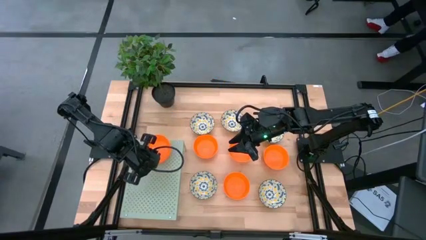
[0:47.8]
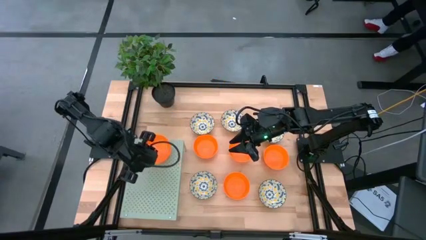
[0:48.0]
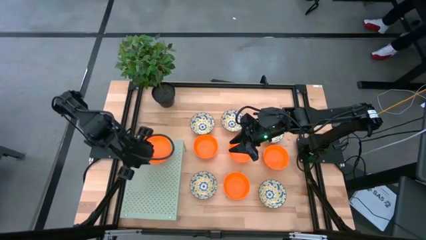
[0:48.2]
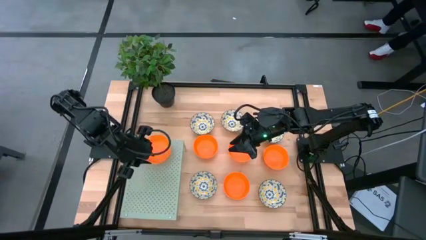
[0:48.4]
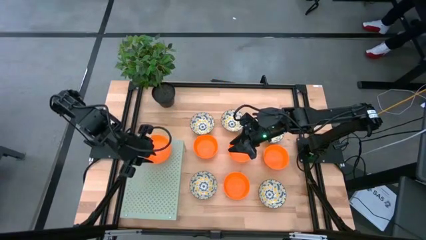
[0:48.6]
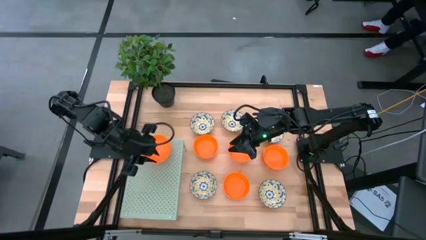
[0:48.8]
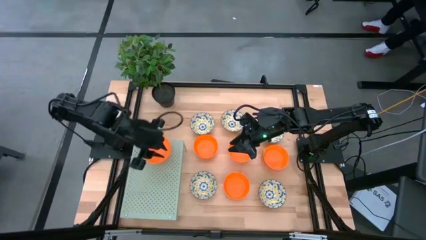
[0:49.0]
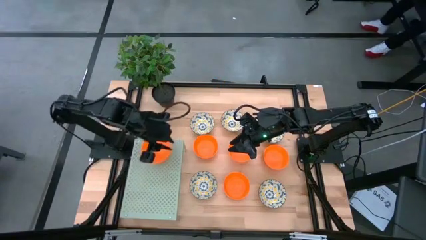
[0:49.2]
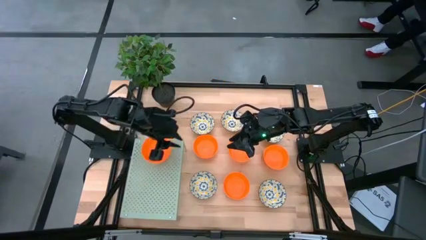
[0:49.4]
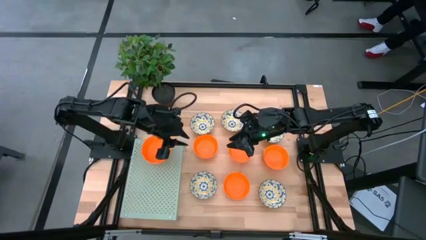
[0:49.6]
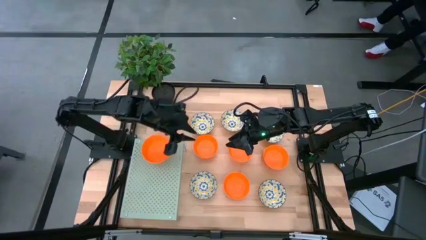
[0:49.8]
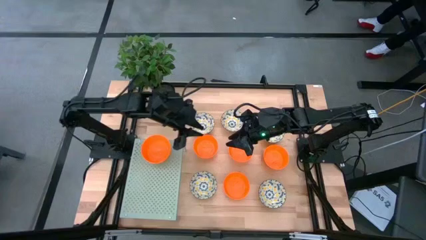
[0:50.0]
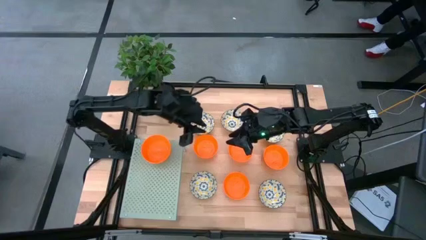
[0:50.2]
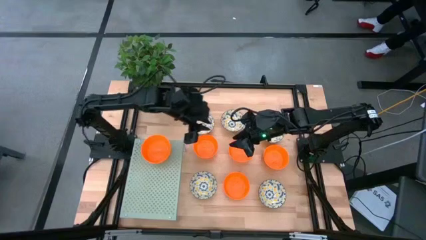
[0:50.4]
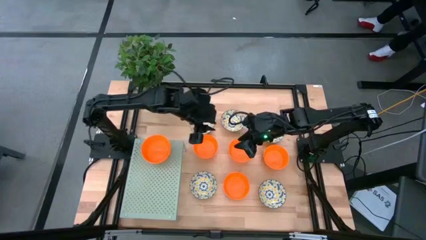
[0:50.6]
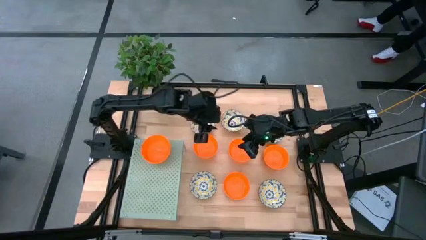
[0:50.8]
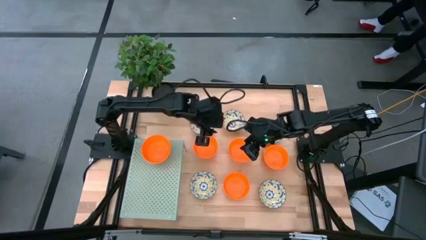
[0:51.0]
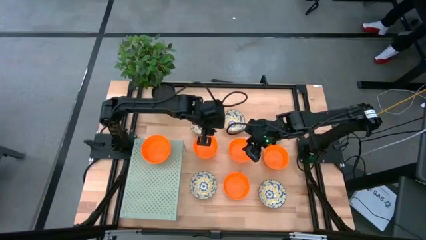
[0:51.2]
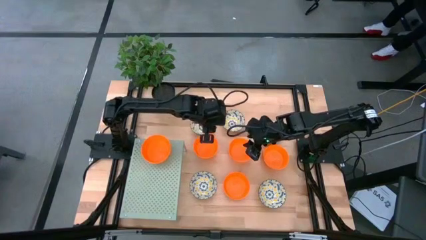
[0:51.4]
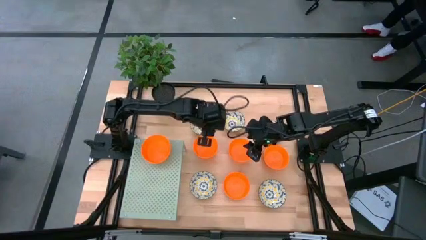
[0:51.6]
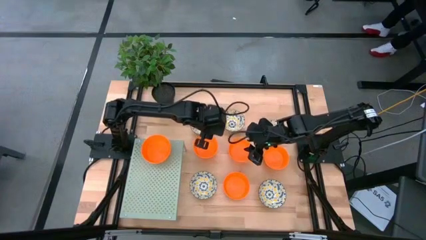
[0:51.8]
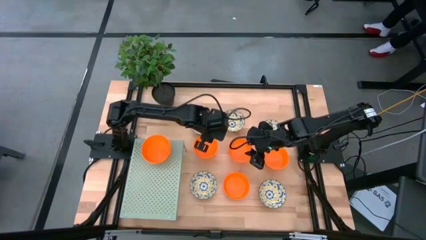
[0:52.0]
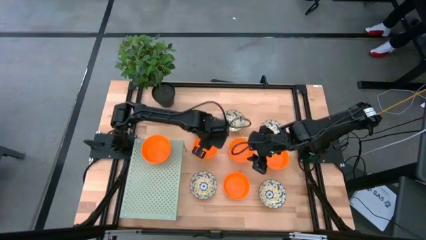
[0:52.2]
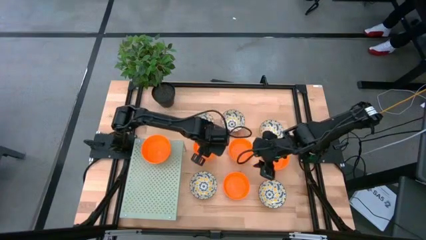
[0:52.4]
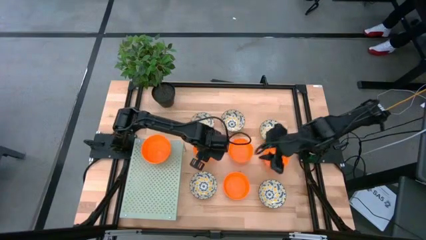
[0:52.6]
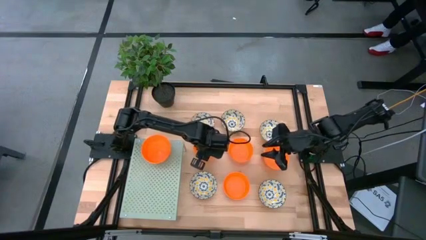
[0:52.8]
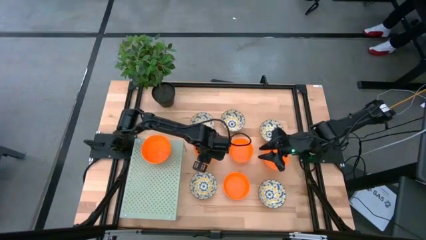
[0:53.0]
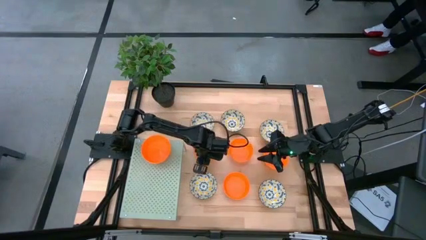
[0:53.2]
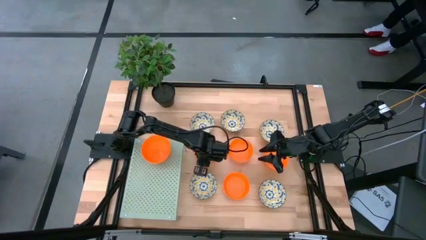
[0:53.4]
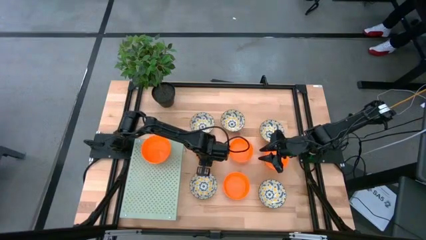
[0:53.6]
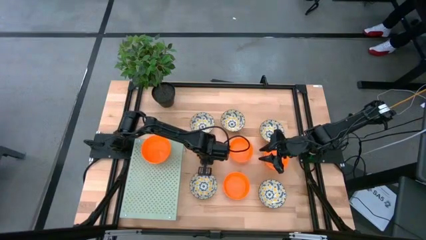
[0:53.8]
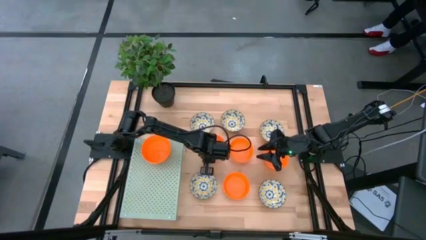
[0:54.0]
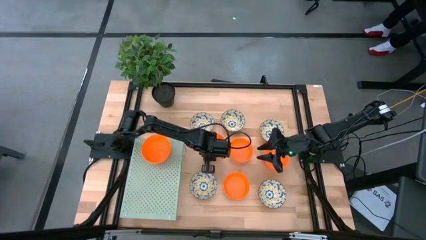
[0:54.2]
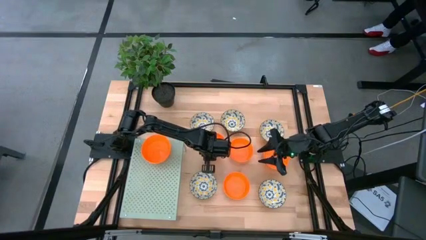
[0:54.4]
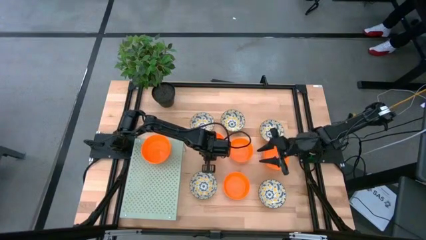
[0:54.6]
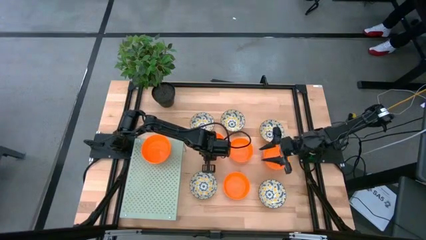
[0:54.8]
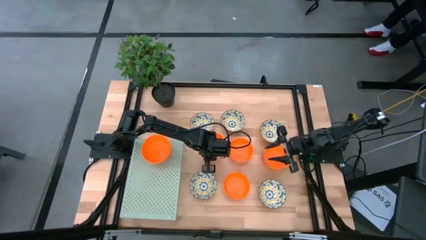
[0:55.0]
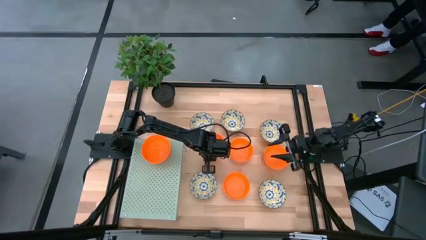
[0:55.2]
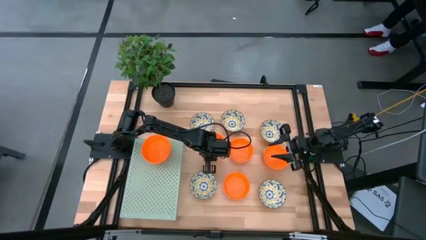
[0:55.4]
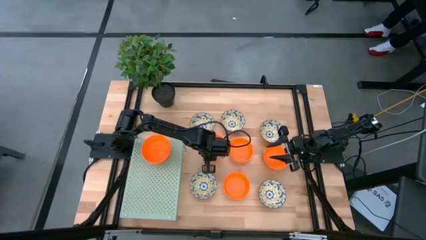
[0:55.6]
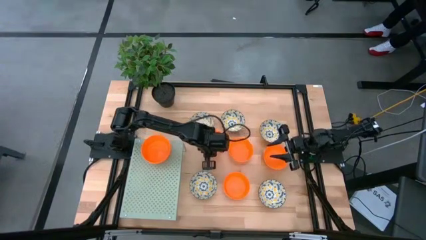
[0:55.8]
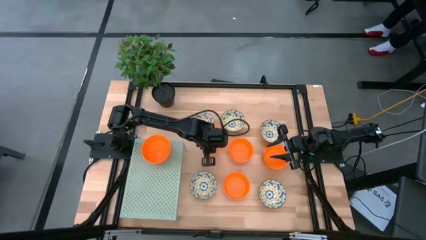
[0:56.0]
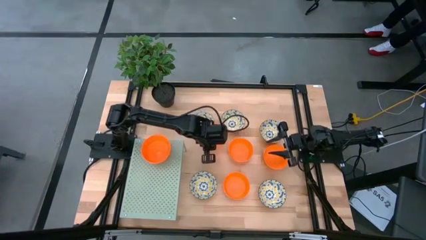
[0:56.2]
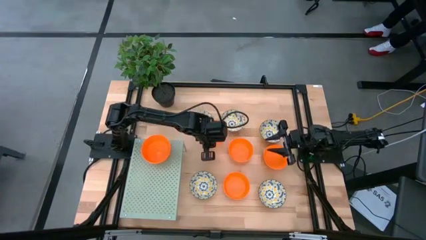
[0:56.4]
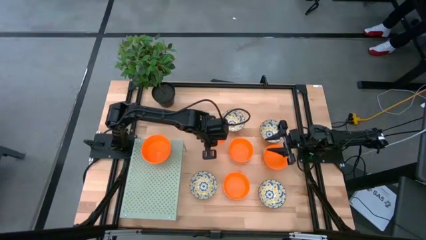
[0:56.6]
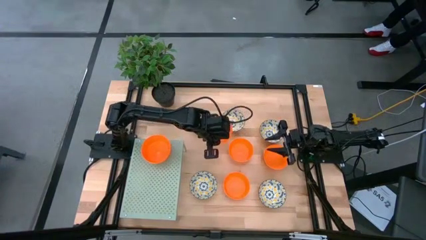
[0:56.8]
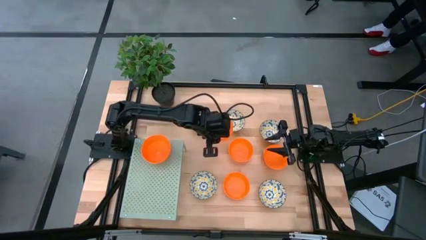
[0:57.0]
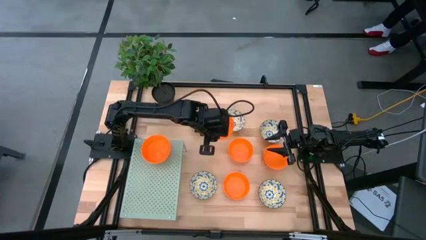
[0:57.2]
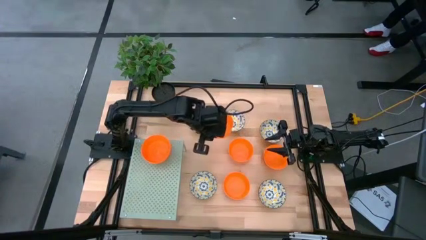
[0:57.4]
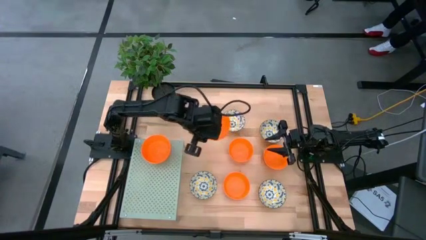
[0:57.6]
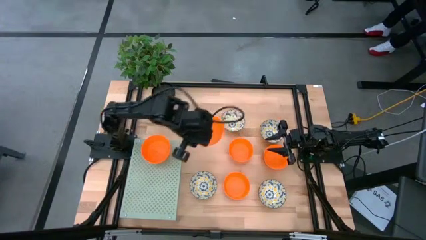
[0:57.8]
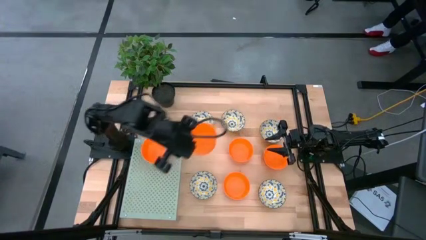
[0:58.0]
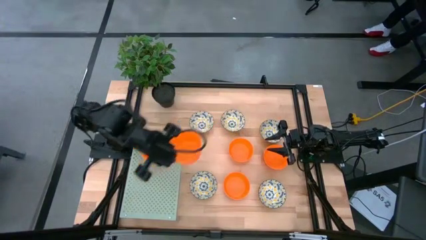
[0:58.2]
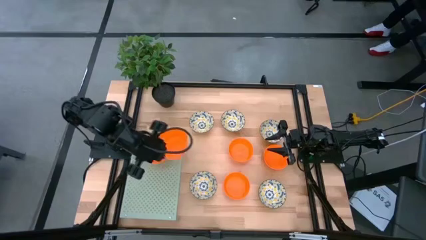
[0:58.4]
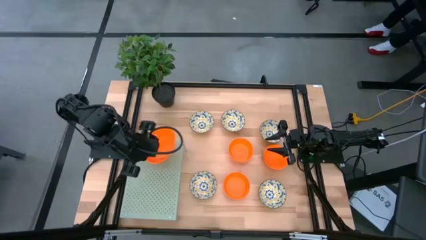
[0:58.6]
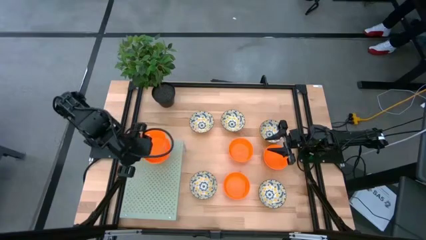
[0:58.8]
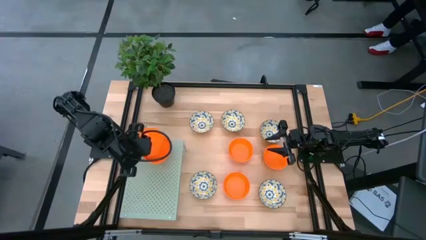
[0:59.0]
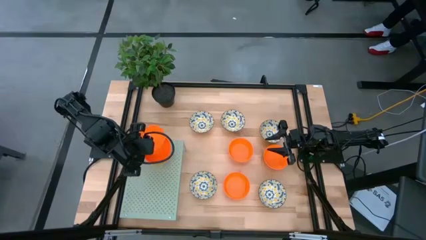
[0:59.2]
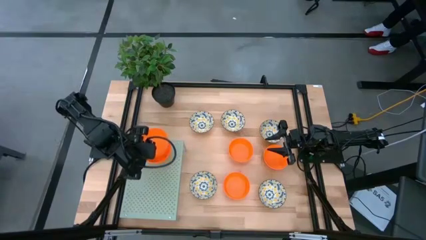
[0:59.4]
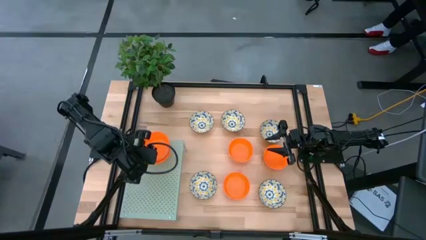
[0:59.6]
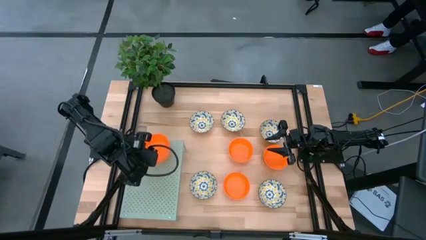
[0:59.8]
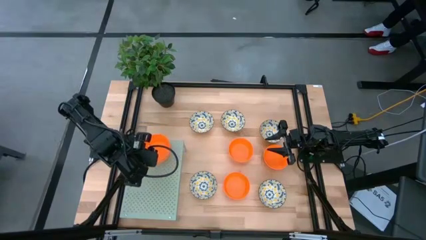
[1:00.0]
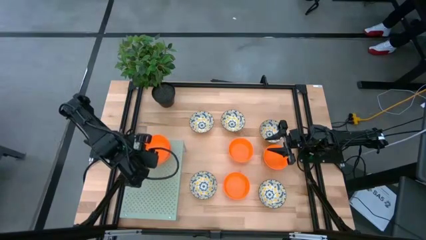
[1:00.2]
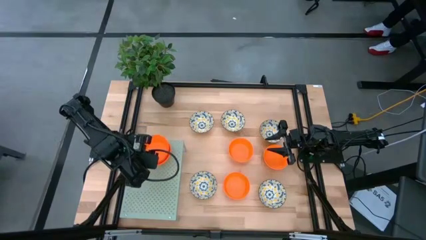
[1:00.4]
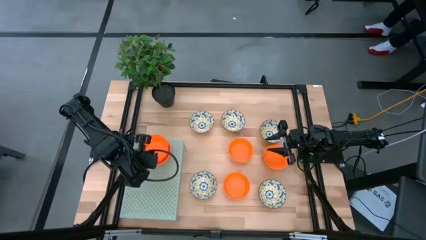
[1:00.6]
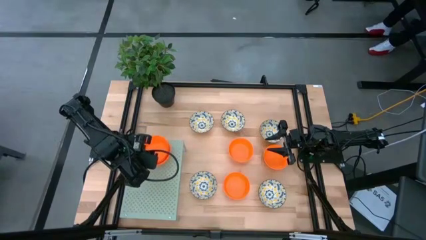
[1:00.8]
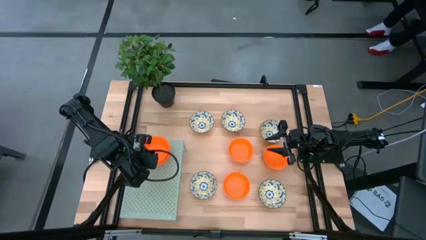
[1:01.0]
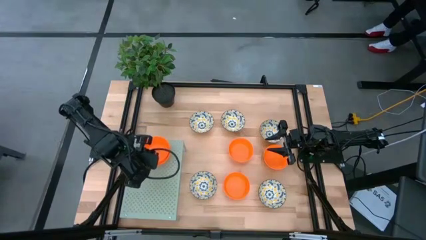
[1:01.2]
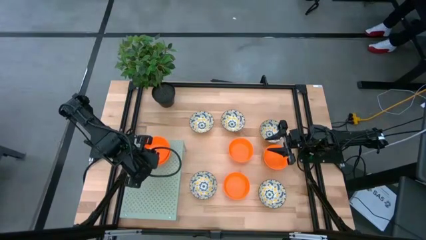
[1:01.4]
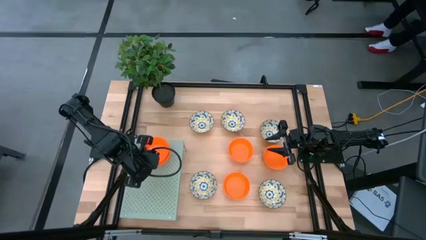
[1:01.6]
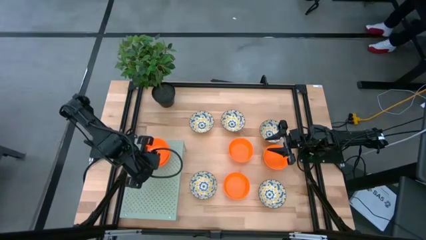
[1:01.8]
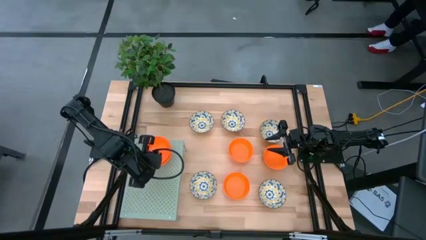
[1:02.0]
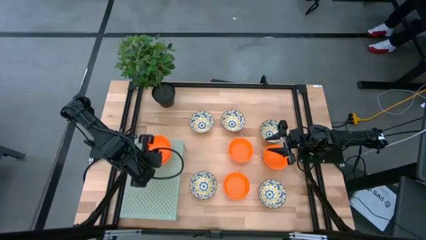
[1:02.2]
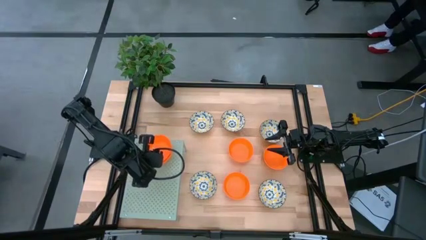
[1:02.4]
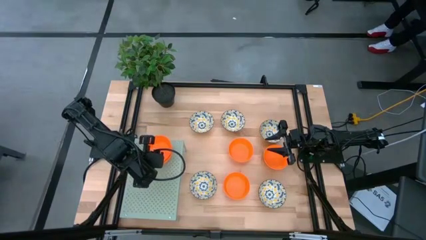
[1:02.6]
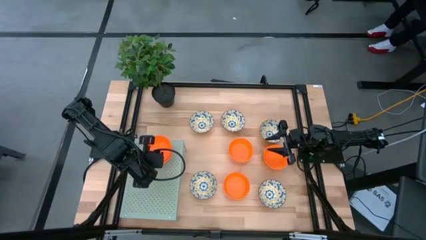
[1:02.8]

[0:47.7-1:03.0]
Task: Pick & Place Mini bowls
Stack the orange bowl on top of the orange bowl on the shelf

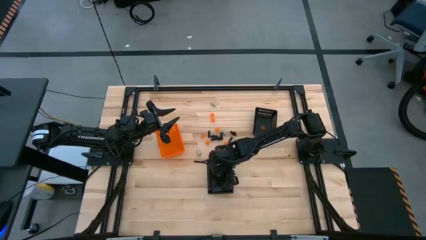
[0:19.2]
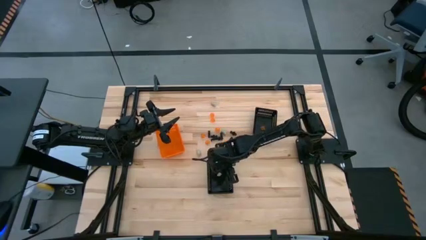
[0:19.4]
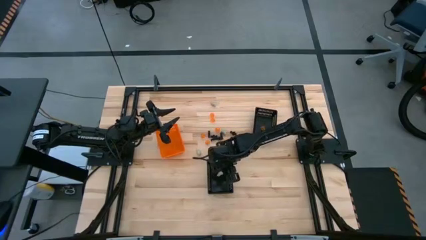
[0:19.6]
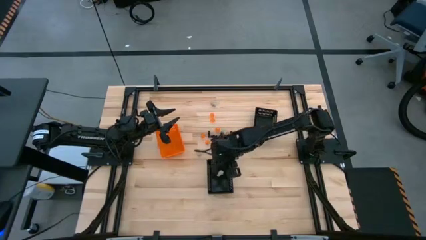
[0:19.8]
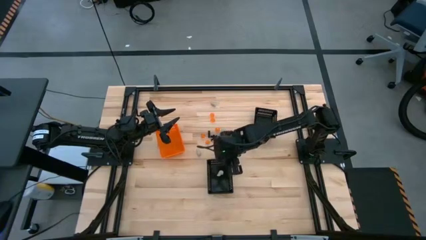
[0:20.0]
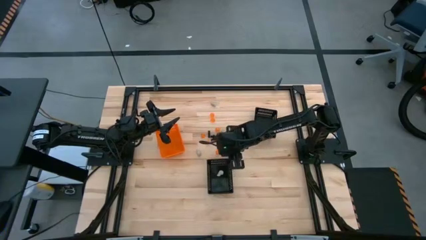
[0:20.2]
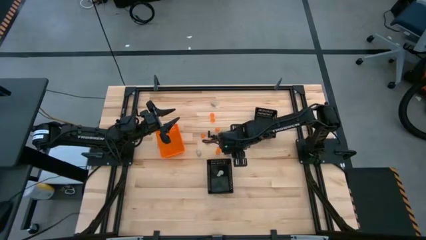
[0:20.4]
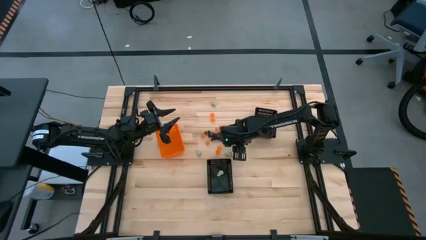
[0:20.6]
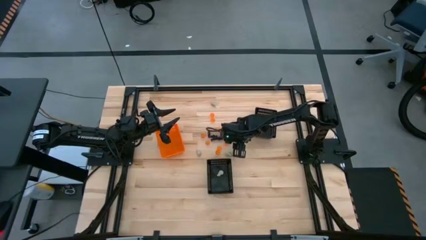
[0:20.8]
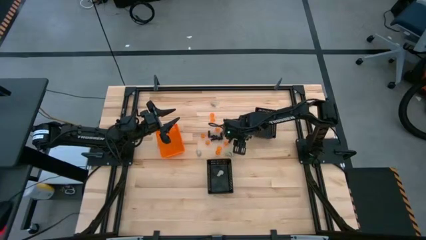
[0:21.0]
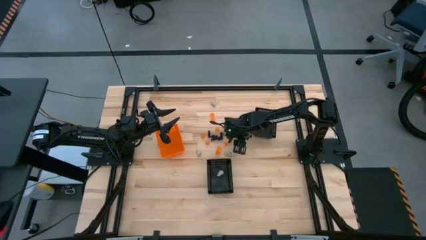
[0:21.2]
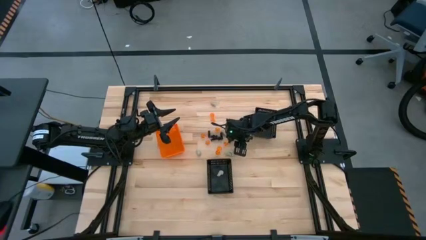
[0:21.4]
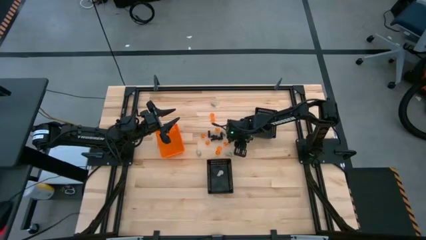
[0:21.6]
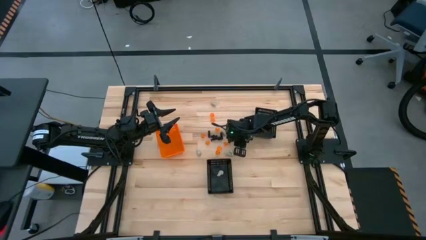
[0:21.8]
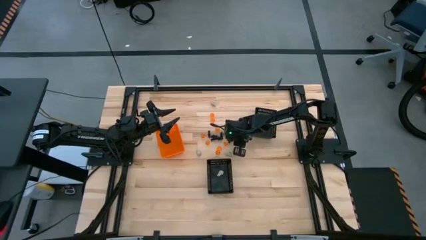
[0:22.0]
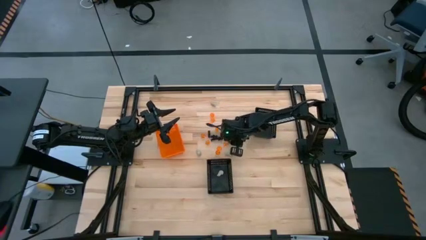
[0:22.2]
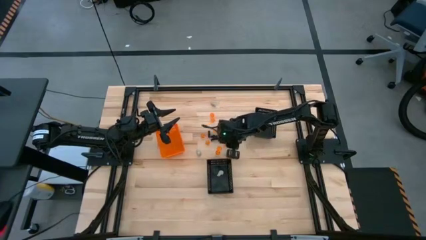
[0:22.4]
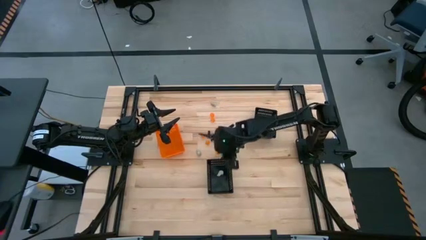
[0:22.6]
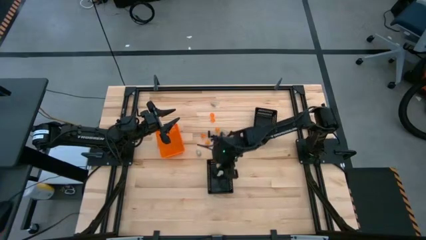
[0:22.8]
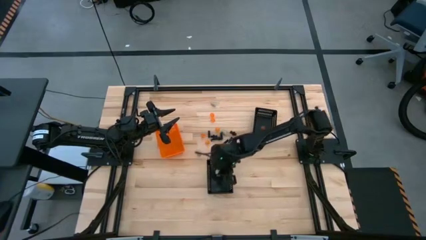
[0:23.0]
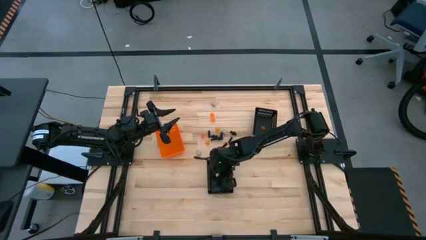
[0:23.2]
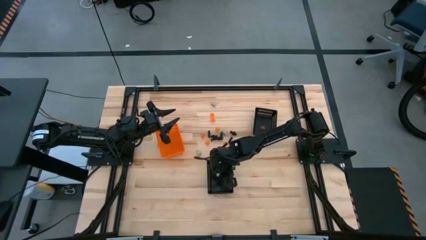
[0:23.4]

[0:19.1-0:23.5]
Task: Sort Halloween decoration
Put the white skull toy into the bottom black bin
